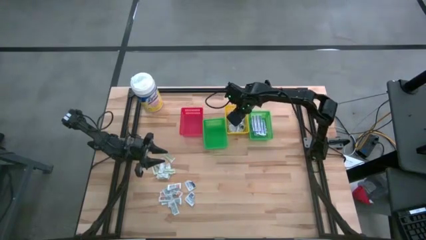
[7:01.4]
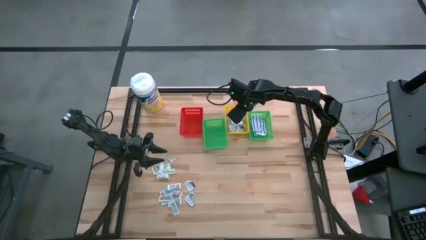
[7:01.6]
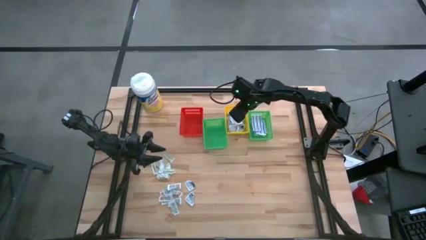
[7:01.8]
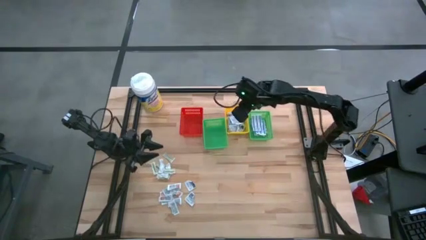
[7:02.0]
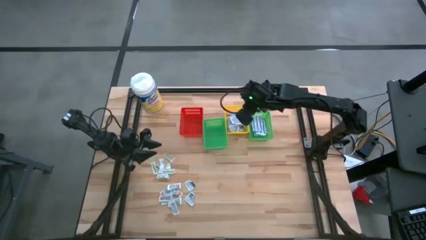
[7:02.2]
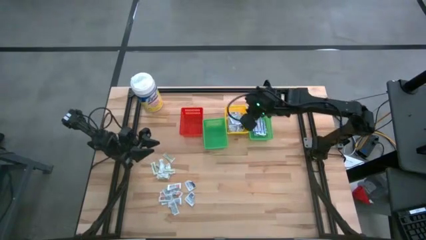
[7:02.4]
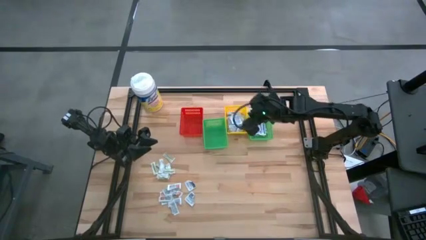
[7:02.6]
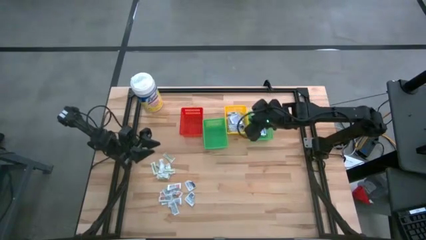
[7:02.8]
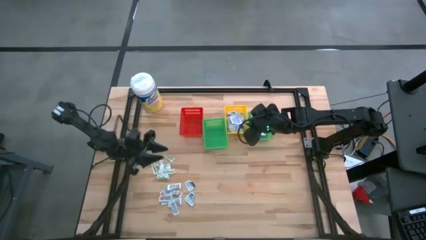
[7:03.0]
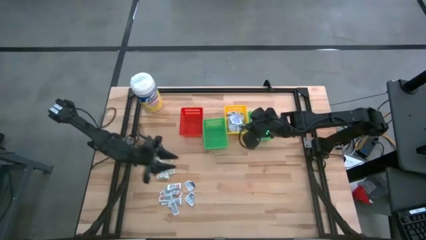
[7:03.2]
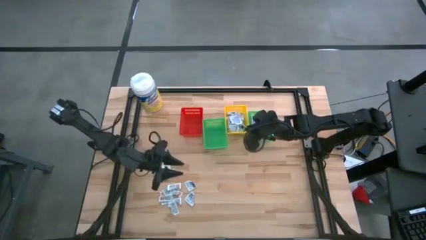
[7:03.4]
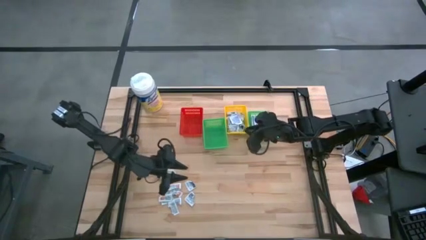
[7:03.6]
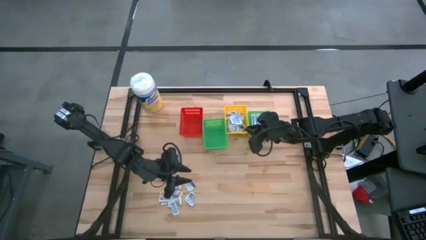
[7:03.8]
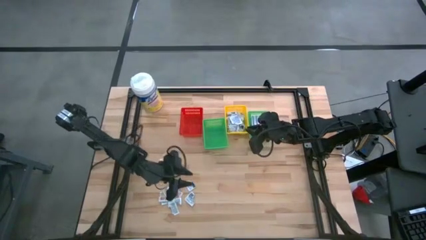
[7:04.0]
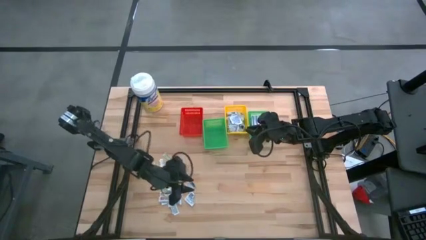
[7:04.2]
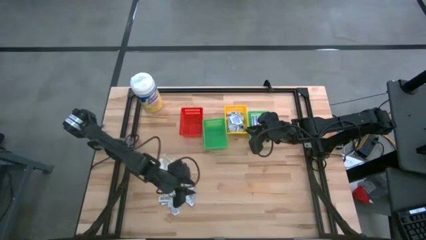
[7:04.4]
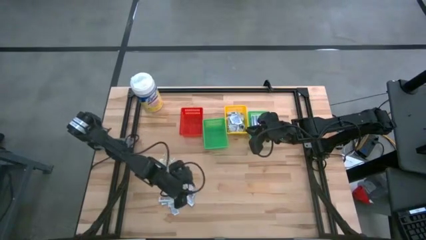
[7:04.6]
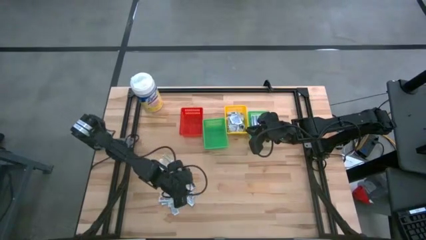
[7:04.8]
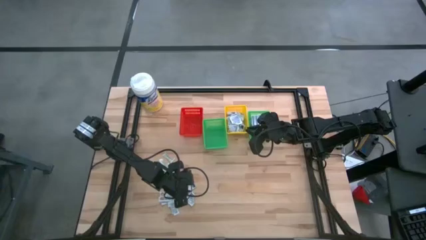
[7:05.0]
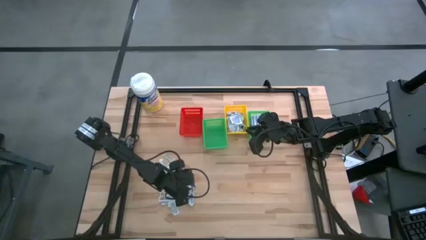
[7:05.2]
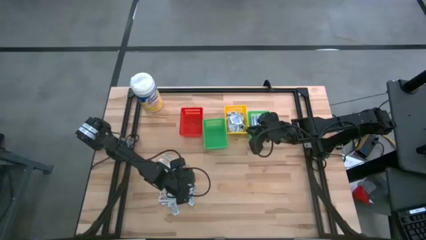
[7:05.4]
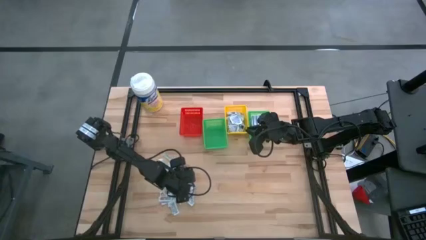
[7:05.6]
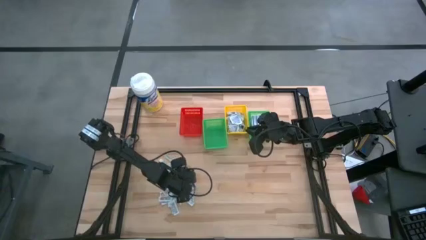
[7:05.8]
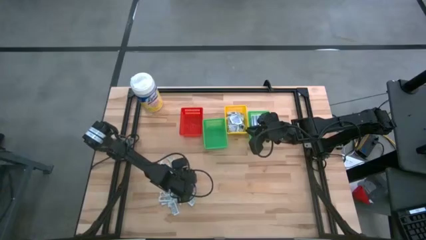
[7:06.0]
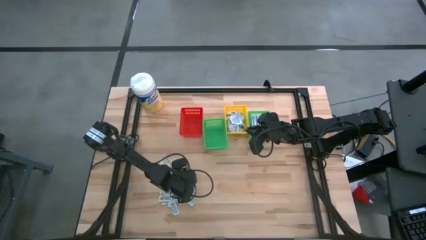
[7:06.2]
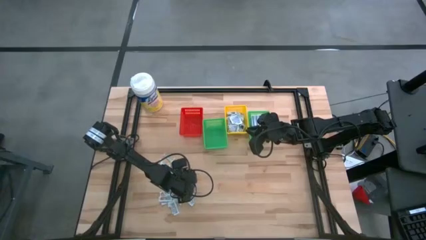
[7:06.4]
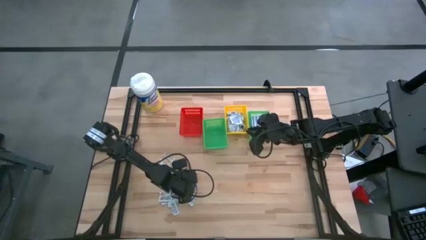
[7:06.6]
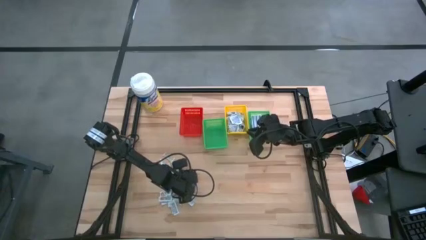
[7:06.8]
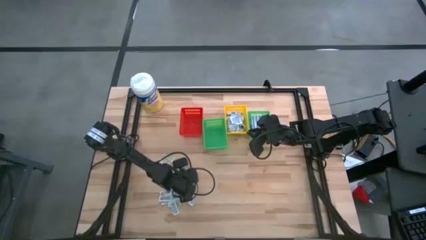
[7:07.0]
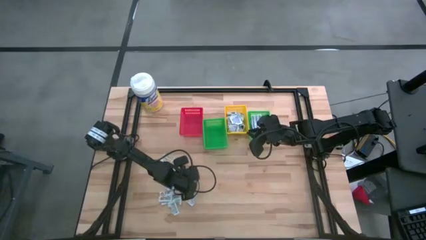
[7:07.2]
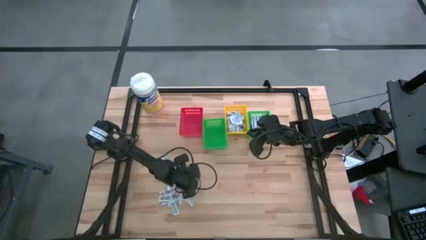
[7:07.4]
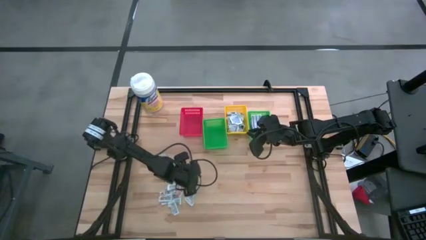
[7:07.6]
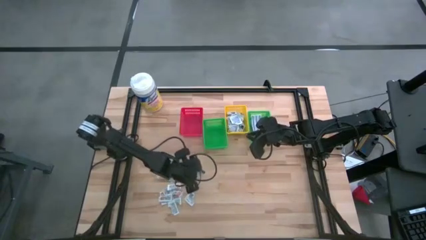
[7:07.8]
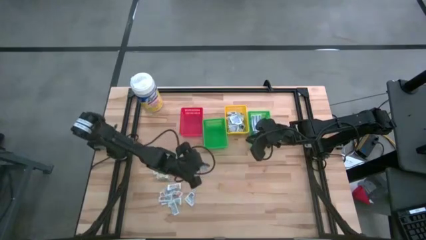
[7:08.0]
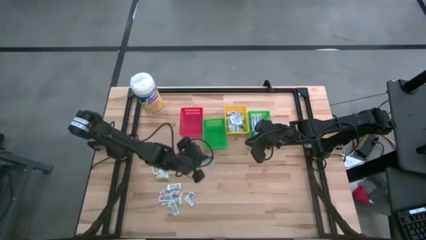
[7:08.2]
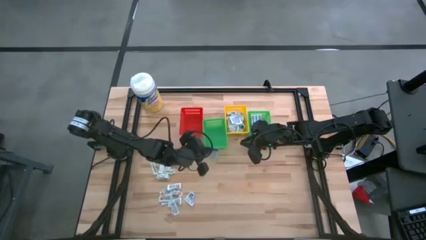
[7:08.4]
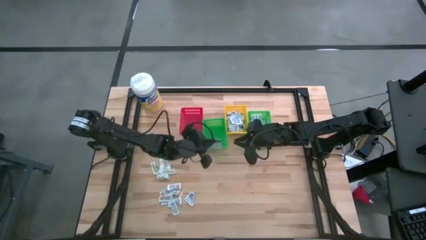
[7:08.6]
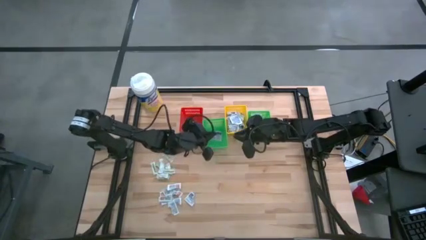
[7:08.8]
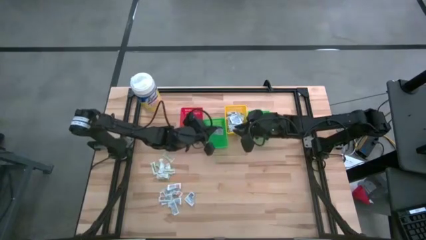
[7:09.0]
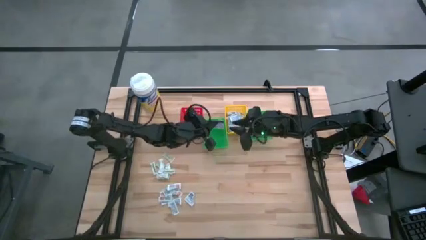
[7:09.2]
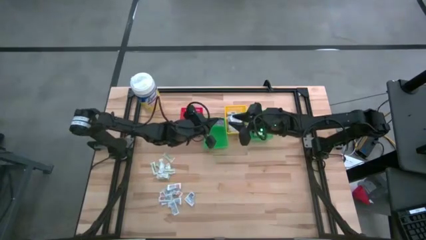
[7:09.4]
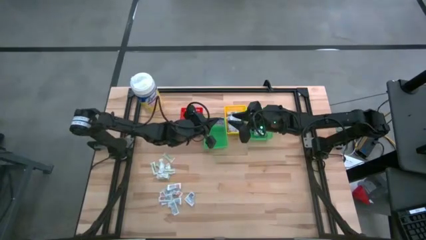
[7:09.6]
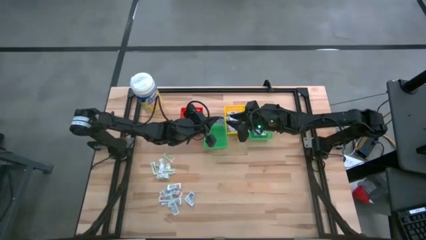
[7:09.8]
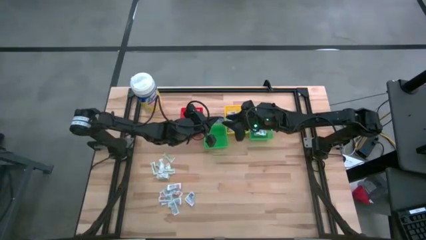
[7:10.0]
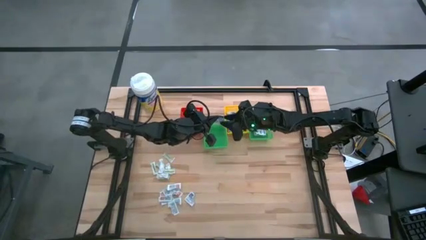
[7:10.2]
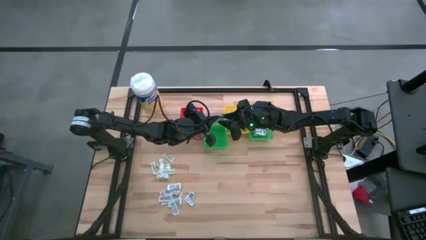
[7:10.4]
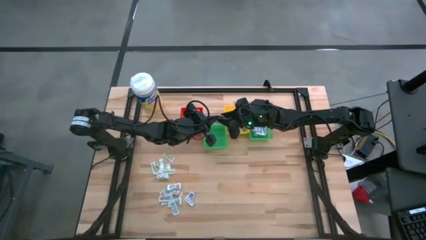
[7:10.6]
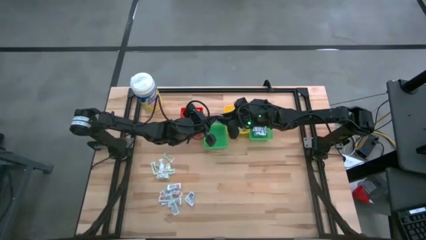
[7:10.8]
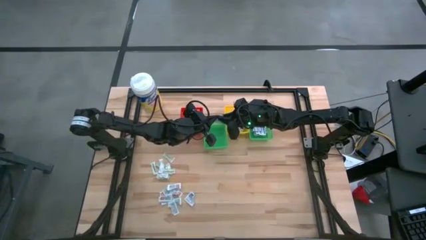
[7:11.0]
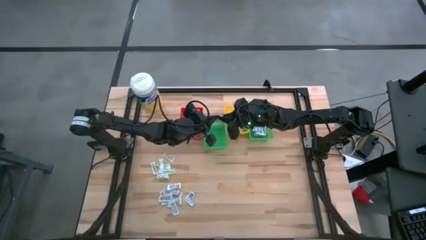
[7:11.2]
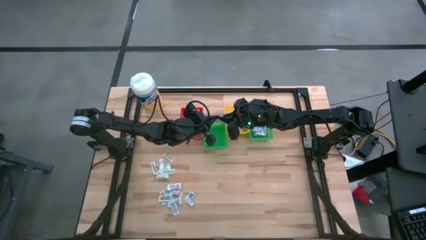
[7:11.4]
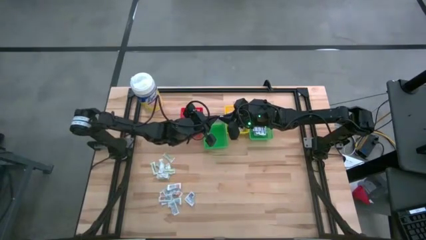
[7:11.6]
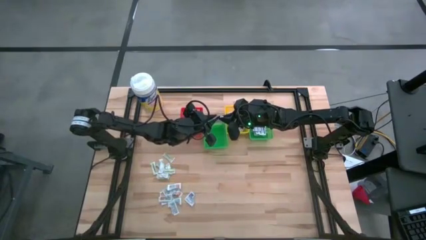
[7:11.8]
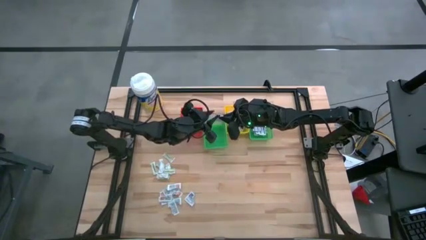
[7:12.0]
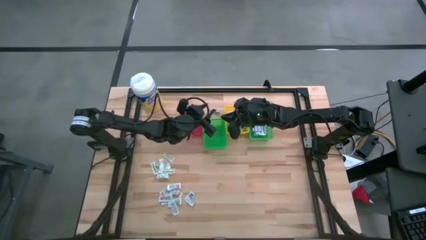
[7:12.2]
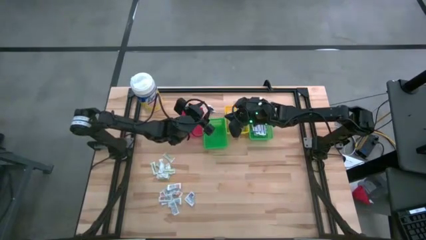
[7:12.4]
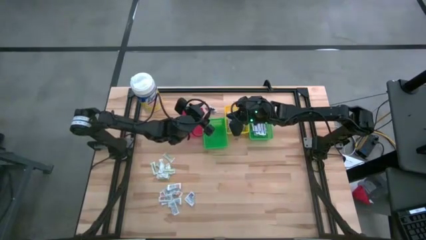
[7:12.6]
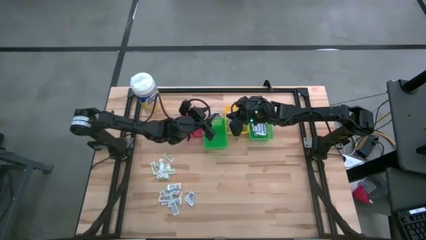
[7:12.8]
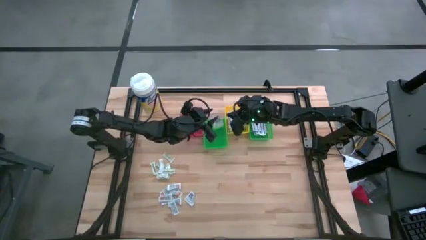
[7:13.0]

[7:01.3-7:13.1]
Task: Pick & Place First Aid Supplies
Put the alcohol pad into the yellow basket

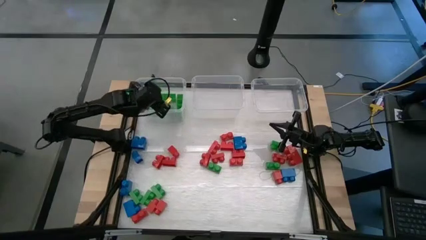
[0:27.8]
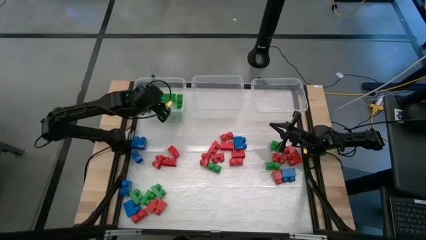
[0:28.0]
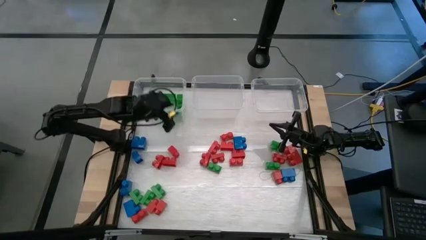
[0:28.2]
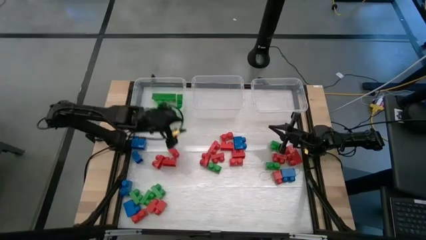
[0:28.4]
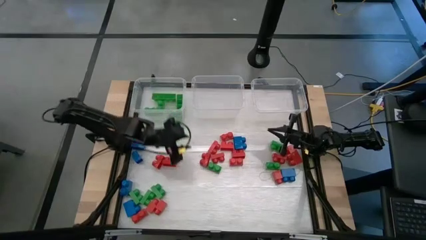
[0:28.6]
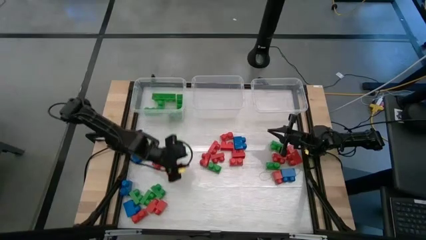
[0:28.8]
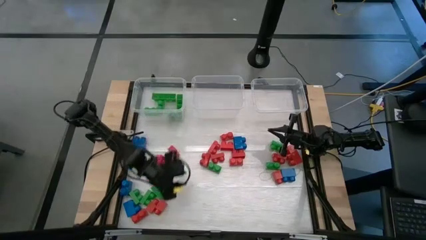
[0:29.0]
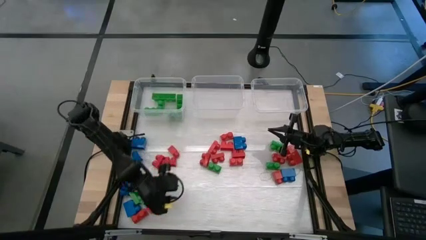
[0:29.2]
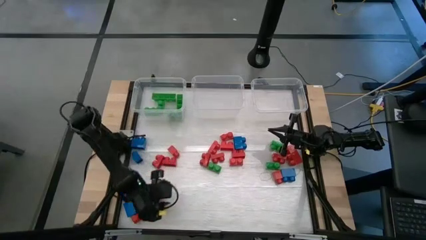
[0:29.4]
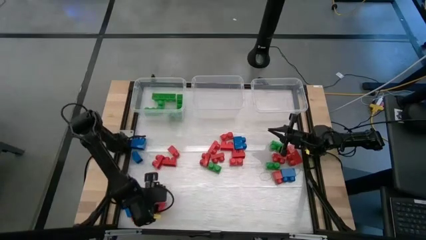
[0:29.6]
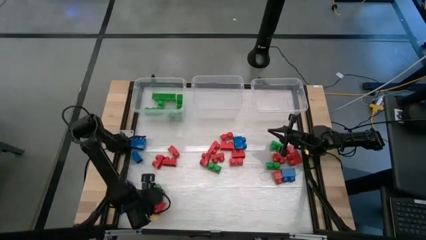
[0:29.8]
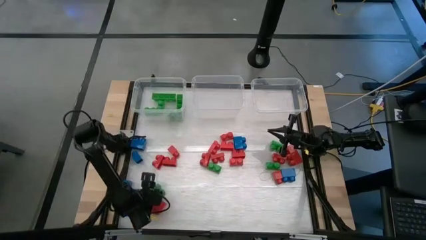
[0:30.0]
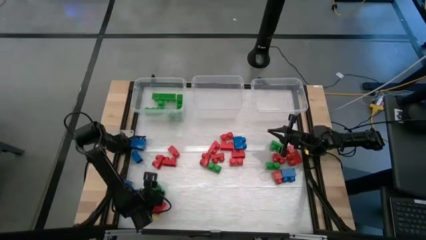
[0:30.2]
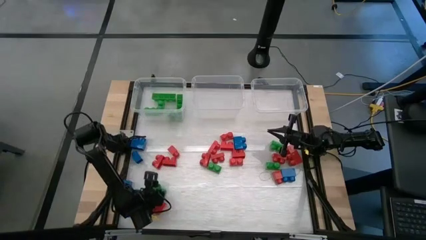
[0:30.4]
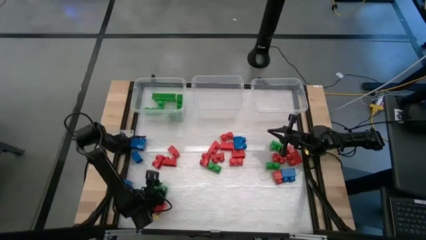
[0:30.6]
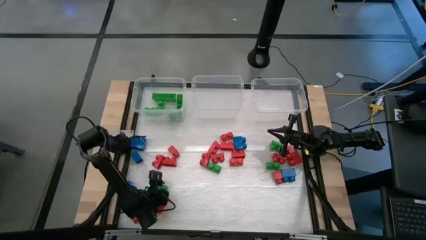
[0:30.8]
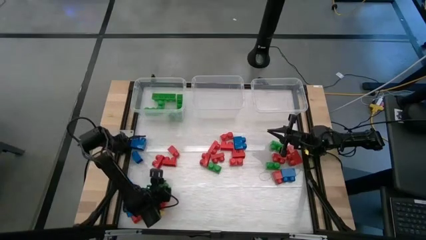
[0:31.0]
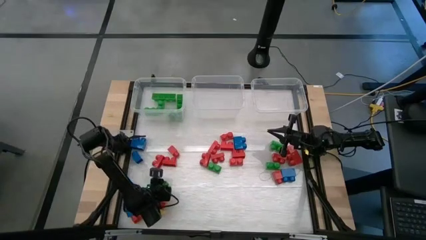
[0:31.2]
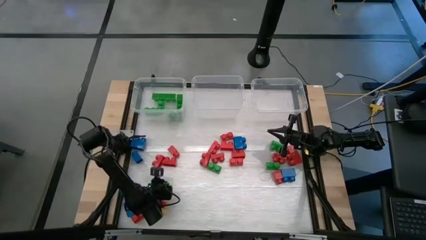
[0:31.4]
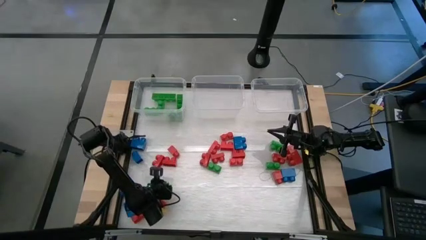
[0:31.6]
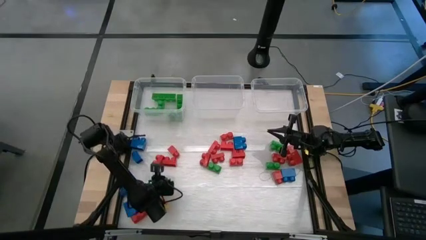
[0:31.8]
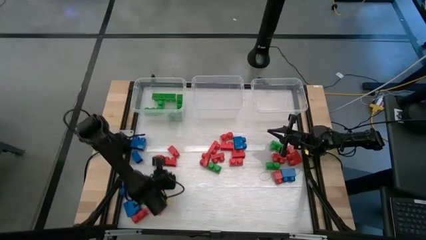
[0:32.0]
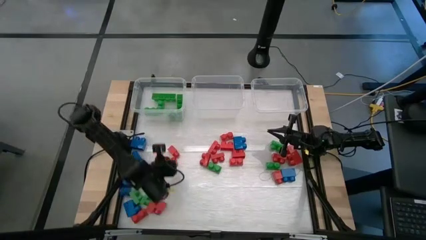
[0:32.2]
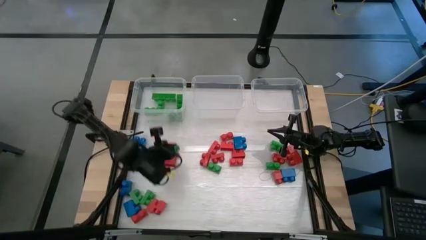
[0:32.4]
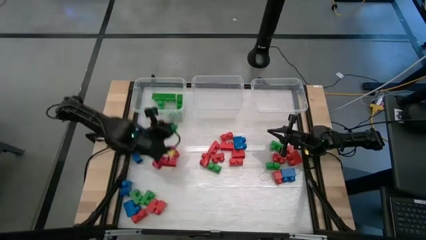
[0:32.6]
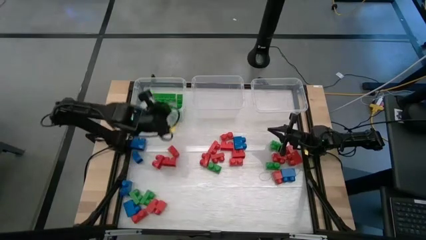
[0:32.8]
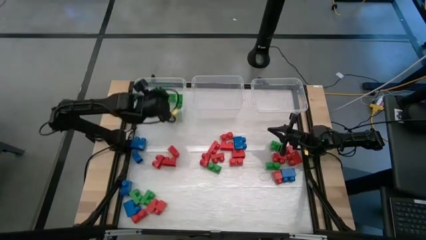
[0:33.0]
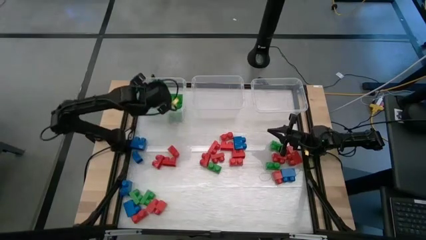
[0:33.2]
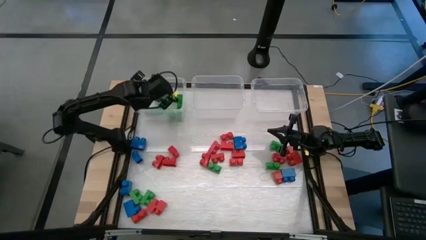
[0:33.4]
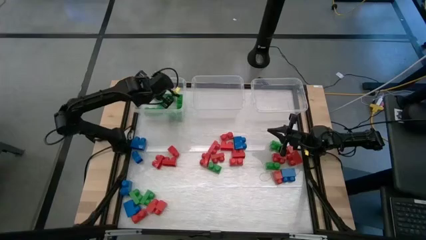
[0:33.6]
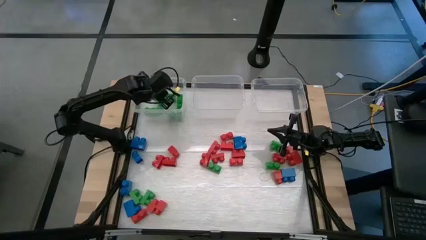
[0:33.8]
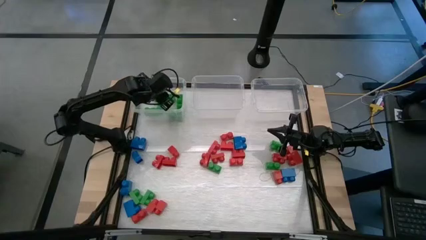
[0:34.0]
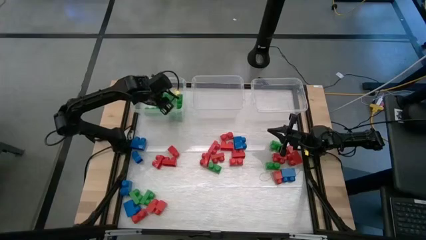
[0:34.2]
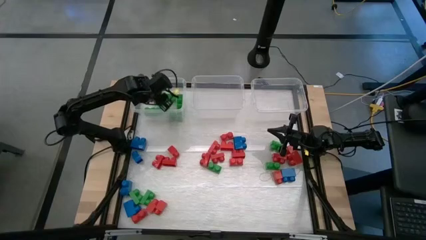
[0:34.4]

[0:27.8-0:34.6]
Task: Sort blocks
Put the green game piece into the left transparent bin
